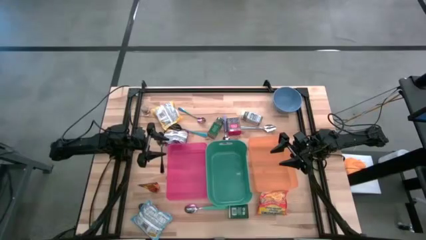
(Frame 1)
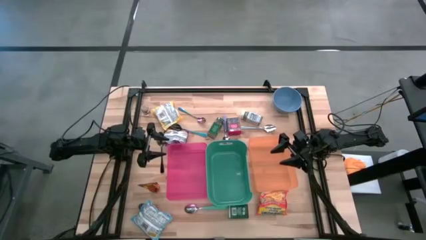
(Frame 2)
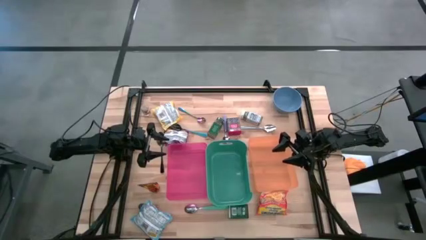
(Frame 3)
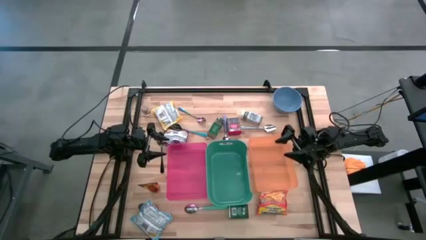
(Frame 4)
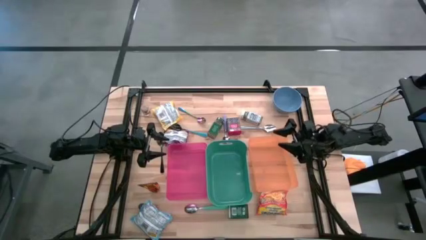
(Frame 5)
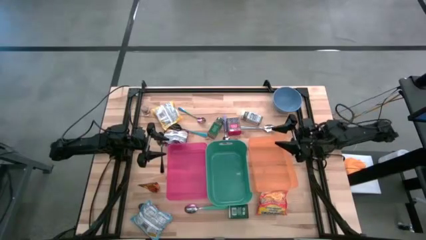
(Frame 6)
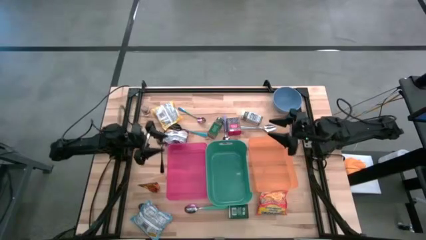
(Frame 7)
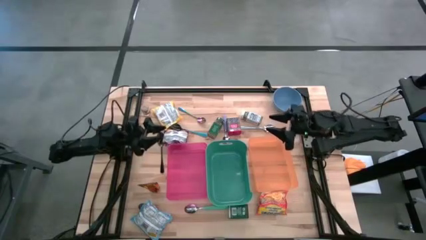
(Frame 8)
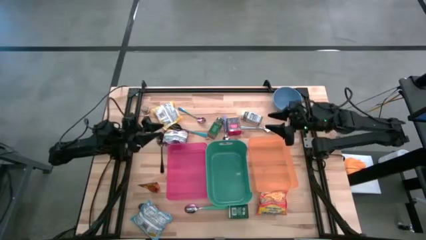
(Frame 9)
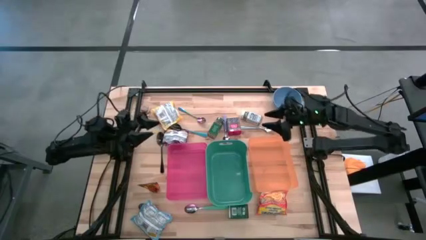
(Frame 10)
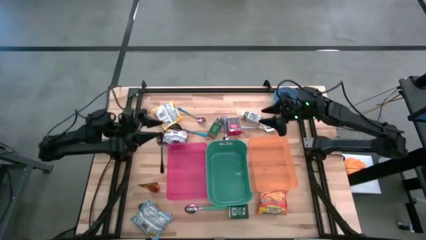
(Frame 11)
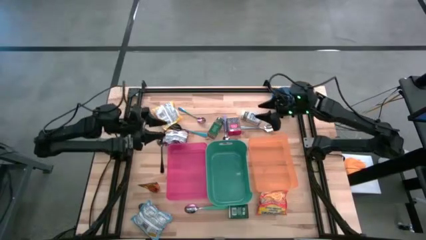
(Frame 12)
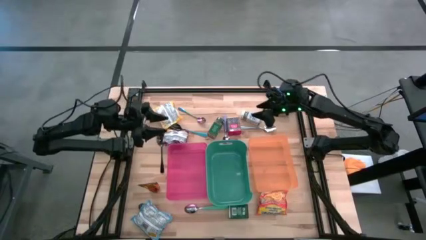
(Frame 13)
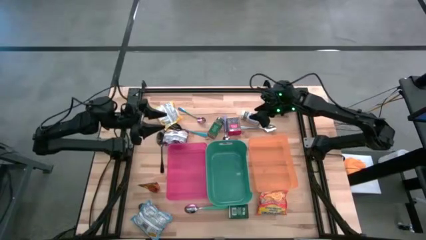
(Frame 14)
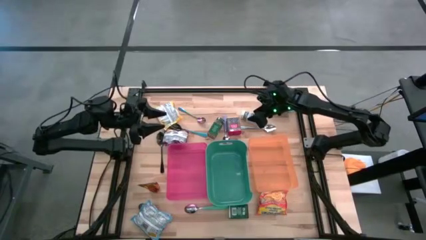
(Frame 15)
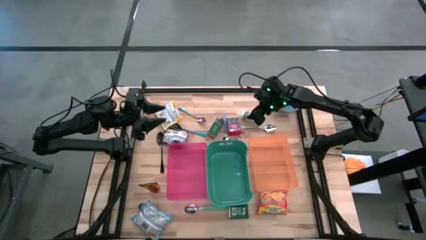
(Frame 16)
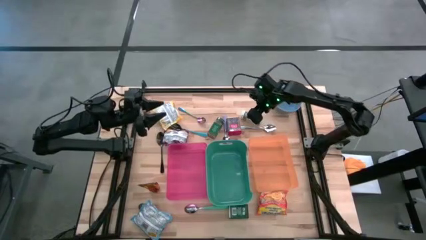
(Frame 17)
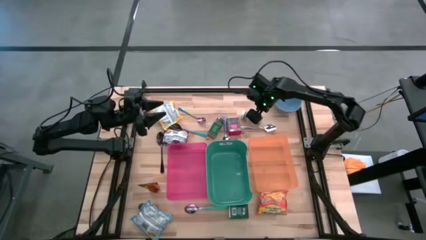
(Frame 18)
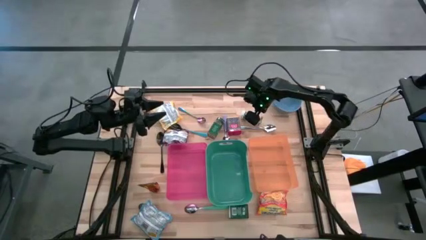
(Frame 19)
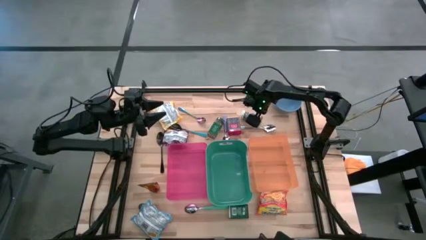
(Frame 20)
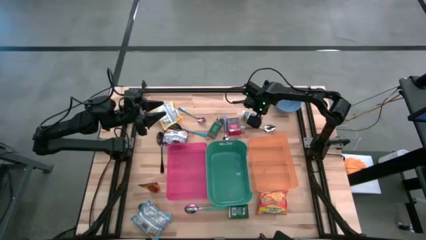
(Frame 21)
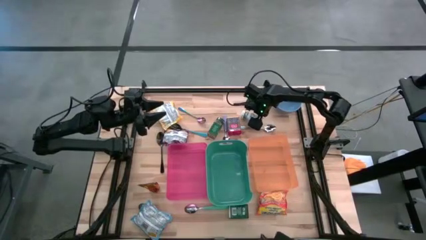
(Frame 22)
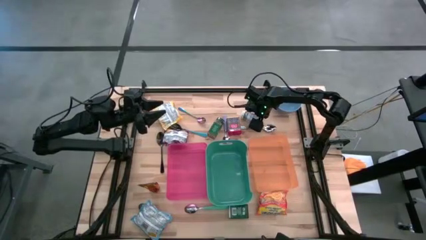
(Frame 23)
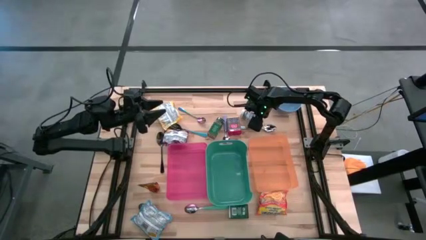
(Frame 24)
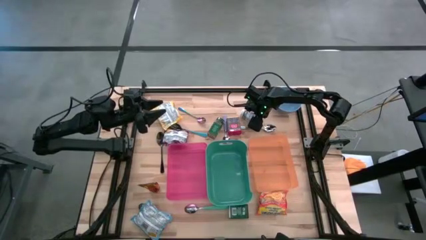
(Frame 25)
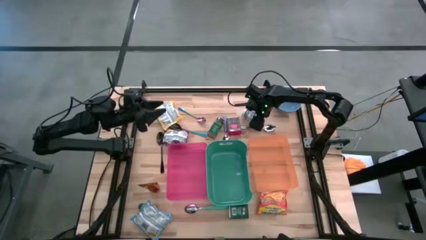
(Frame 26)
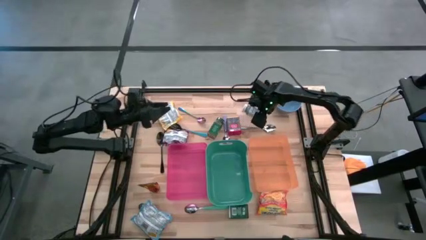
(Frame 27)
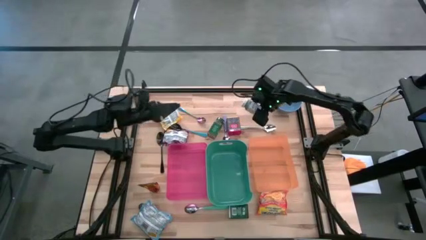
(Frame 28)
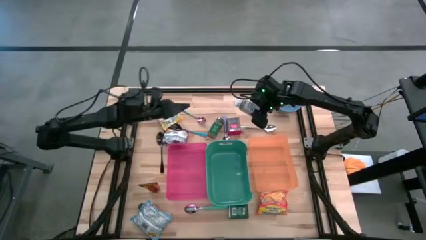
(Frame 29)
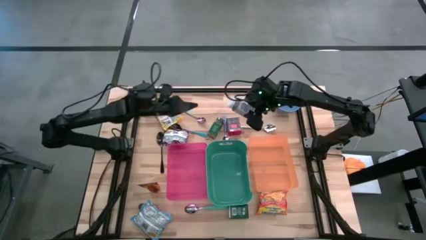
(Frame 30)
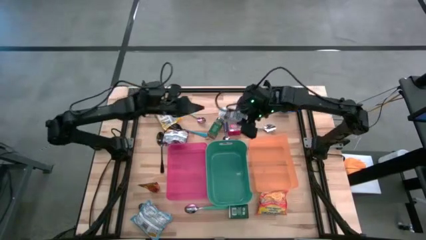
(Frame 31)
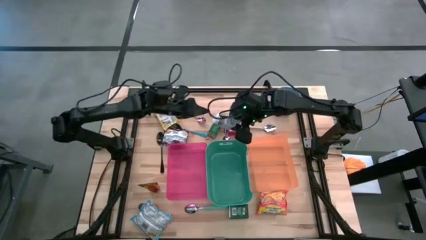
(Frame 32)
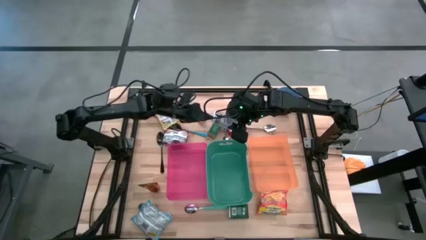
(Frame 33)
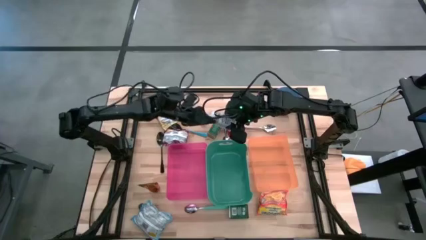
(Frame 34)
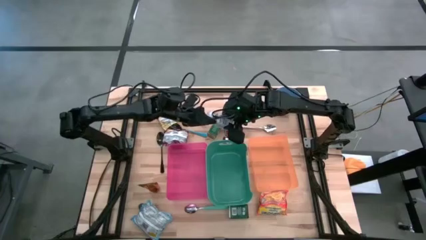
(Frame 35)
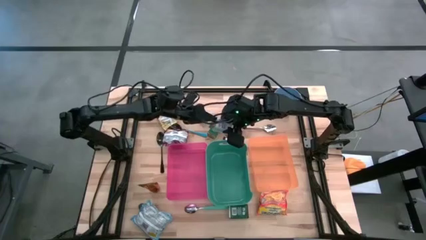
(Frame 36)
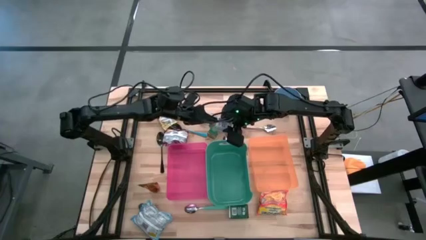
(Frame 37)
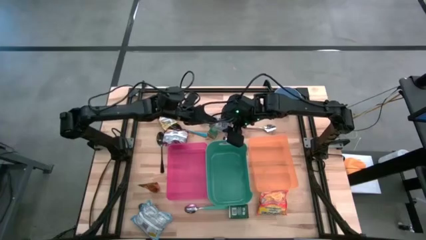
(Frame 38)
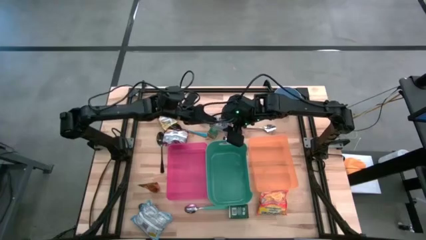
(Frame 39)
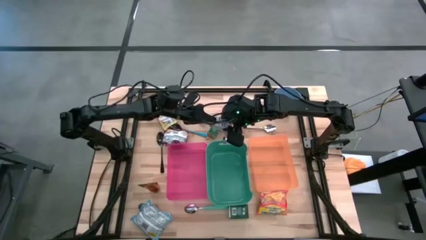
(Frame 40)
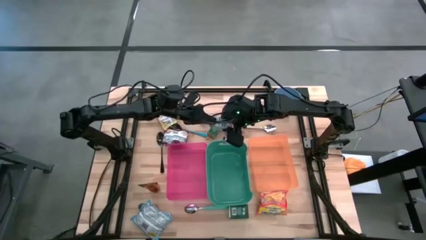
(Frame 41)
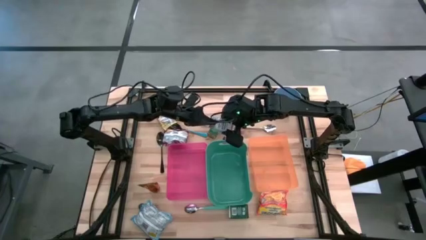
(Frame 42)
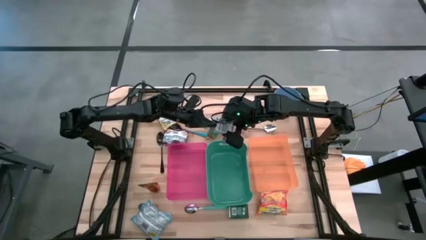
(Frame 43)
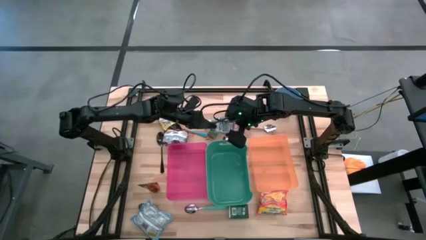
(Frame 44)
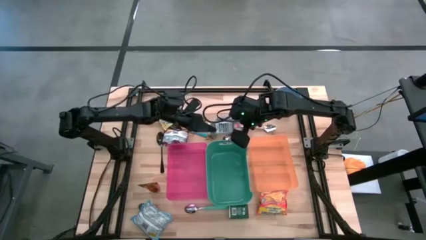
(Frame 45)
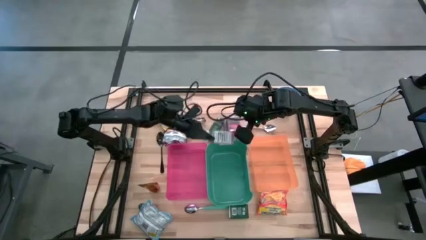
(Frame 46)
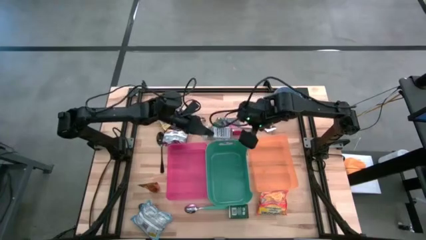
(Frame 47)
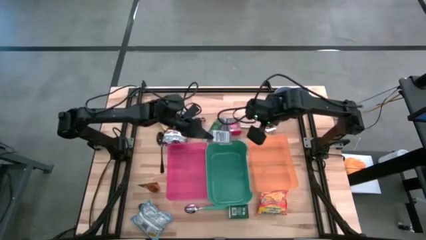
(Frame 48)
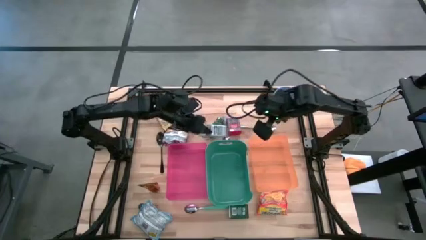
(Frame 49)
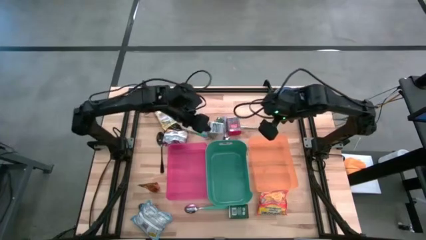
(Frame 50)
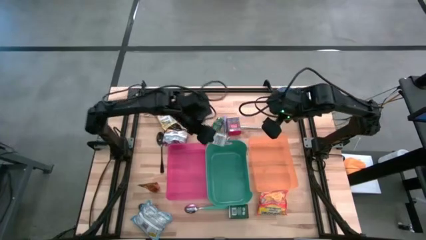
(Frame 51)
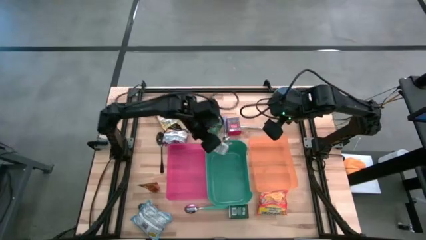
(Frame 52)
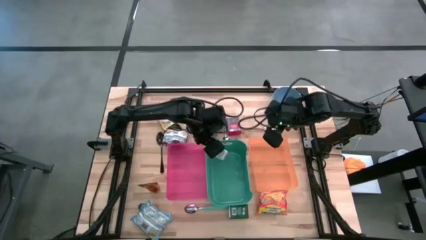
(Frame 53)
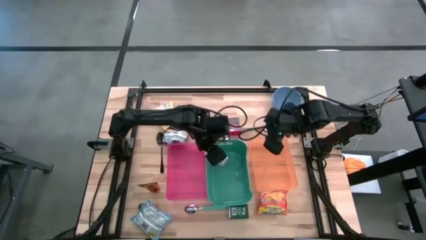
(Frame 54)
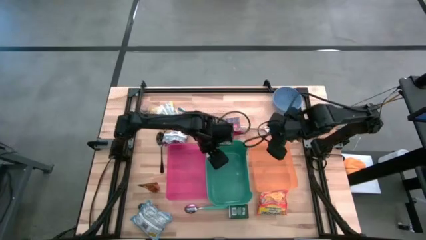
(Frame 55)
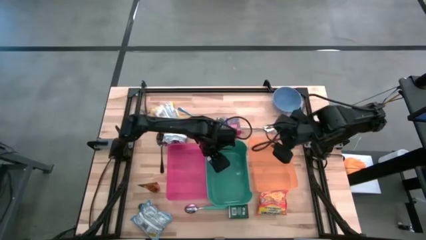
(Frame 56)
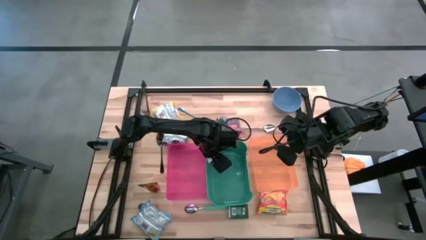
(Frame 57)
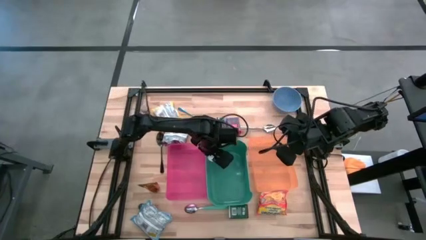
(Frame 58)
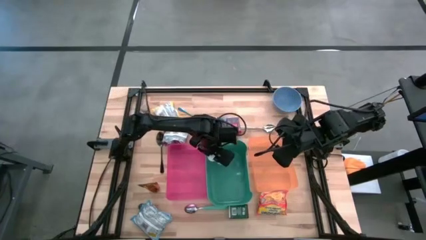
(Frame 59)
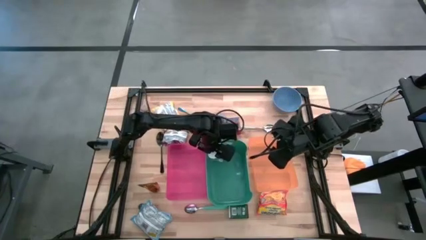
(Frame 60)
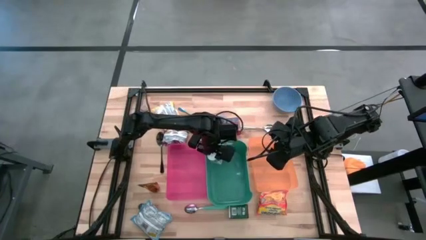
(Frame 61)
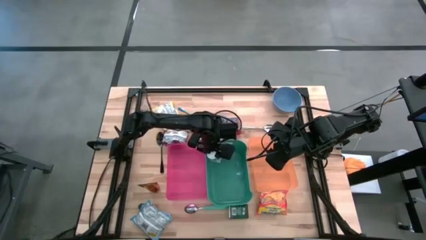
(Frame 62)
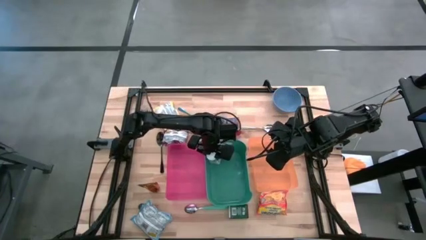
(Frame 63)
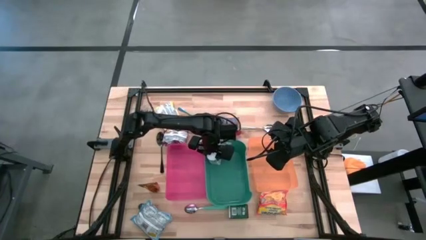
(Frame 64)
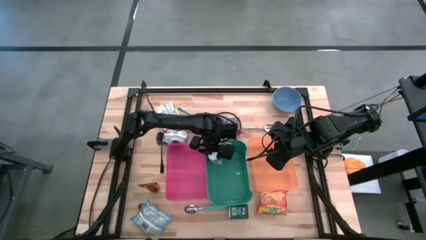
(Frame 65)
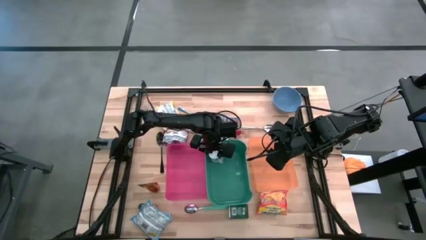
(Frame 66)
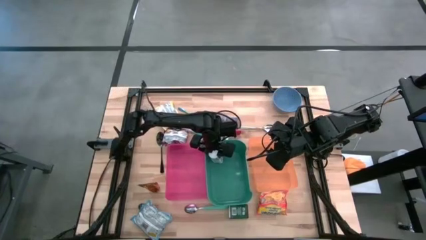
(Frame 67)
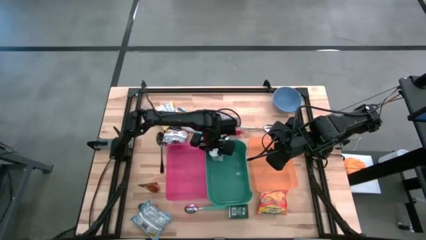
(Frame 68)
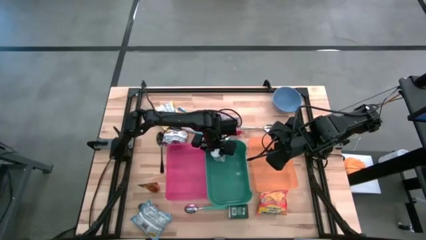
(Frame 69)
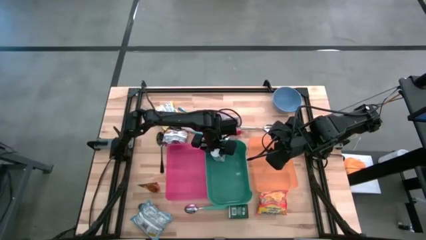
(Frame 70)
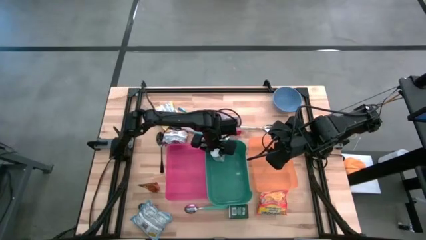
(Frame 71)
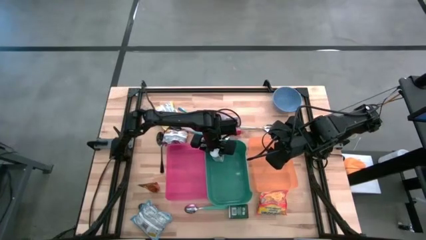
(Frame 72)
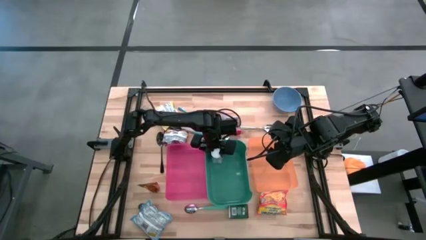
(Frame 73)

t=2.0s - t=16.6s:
Put the white seasoning bottle into the green bin
